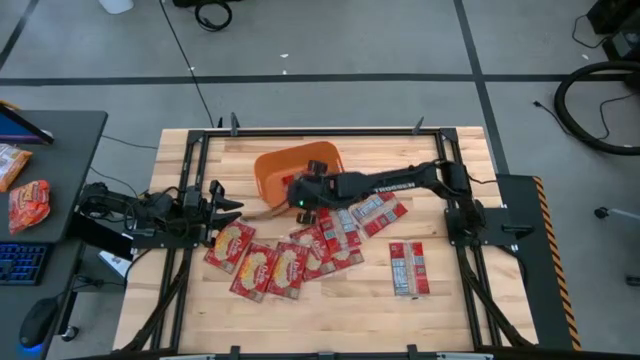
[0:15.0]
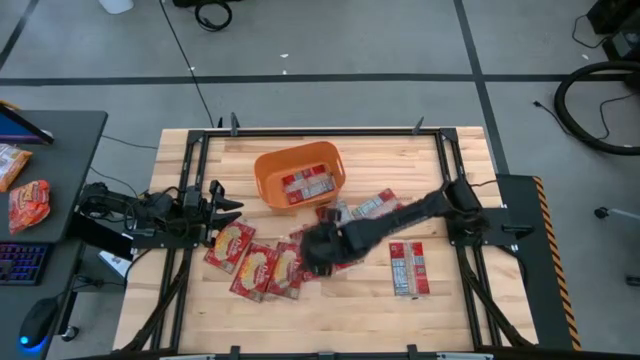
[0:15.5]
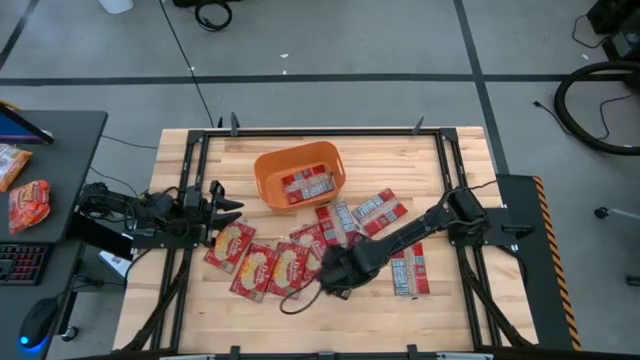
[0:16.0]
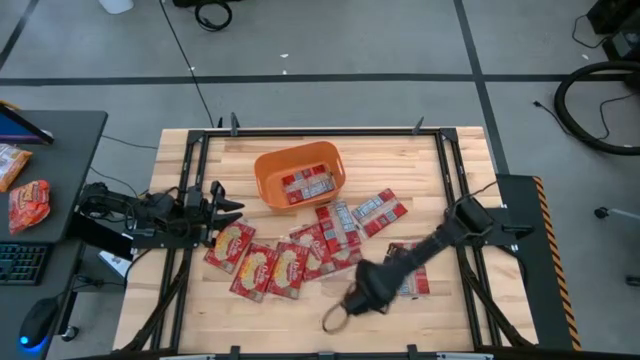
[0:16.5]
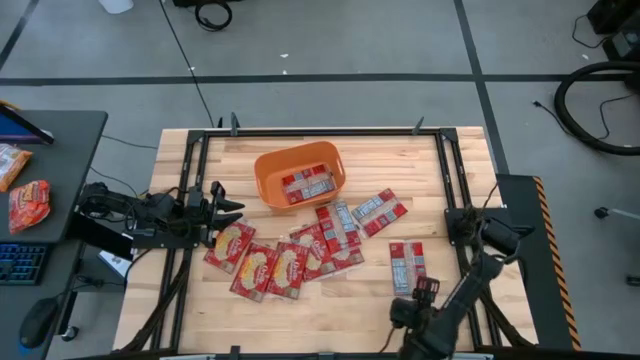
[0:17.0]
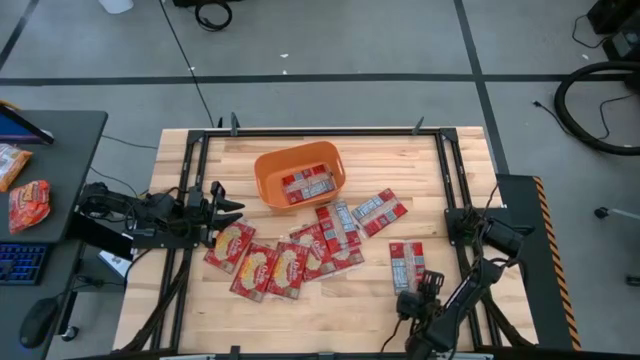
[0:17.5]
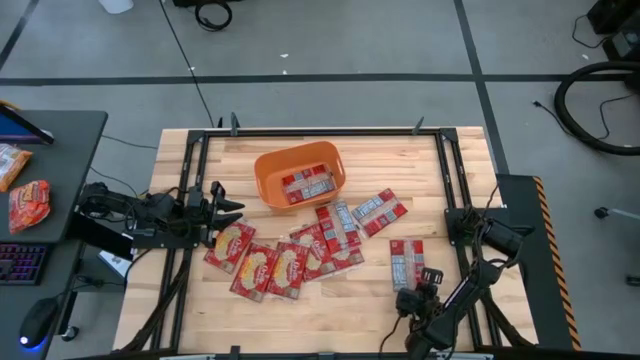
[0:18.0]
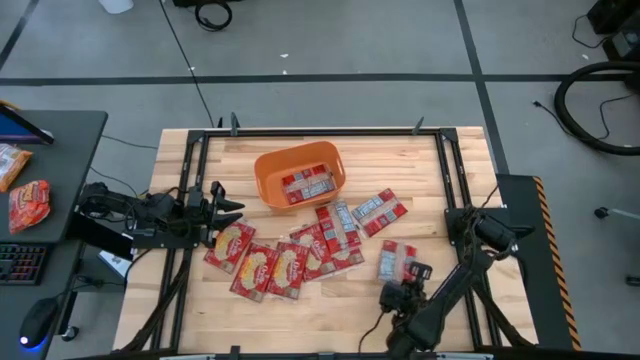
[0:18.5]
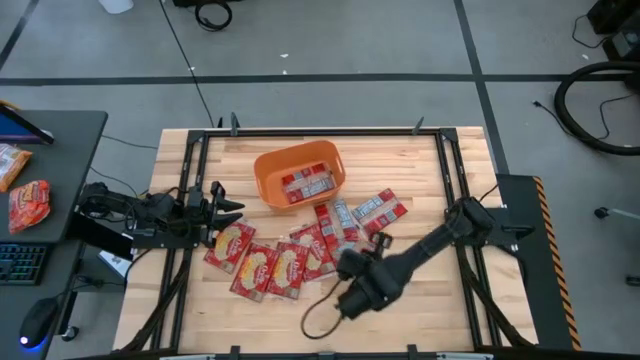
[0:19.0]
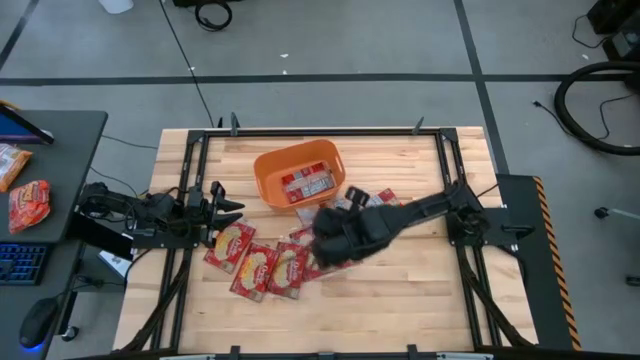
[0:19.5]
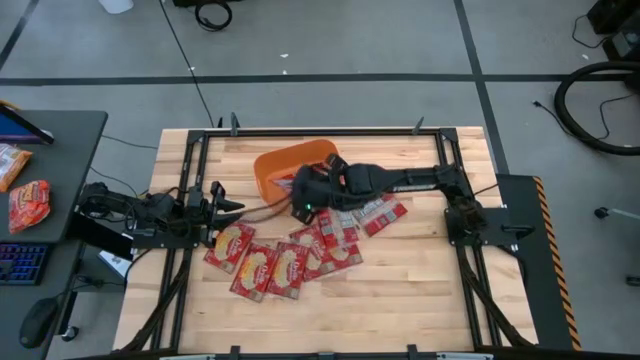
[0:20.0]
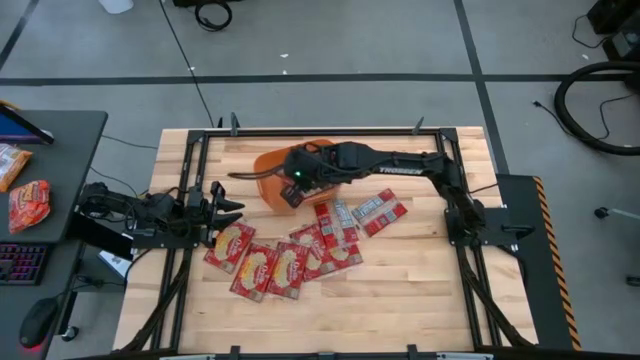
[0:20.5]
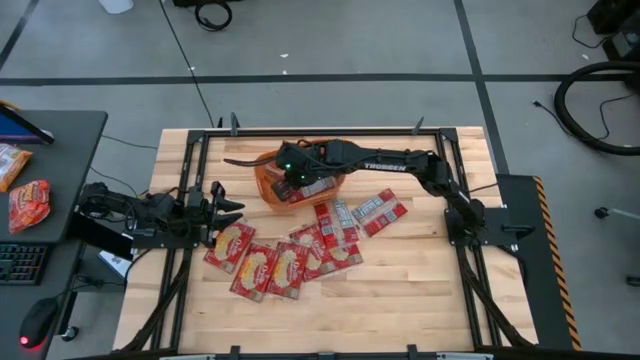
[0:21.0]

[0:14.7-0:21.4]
Task: Sort popcorn bags into baskets
Put the popcorn bag into the orange bin

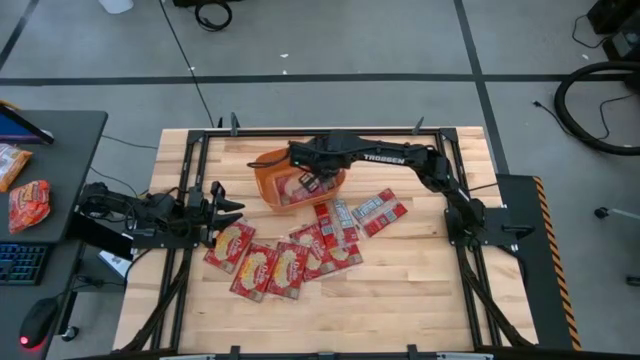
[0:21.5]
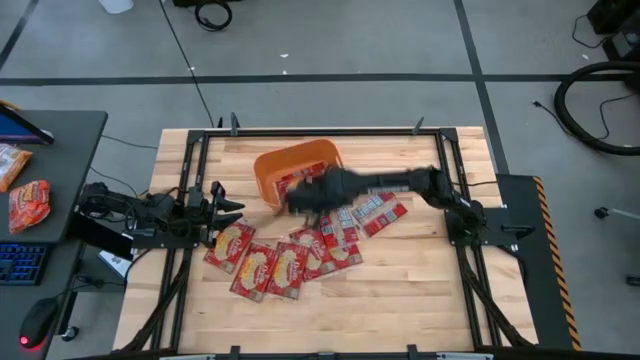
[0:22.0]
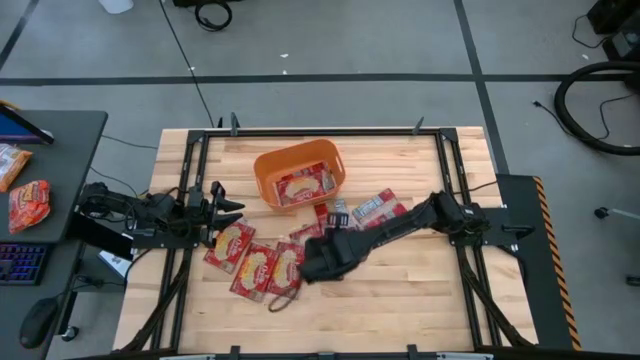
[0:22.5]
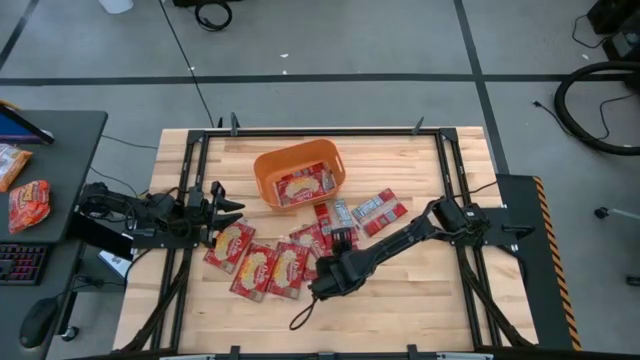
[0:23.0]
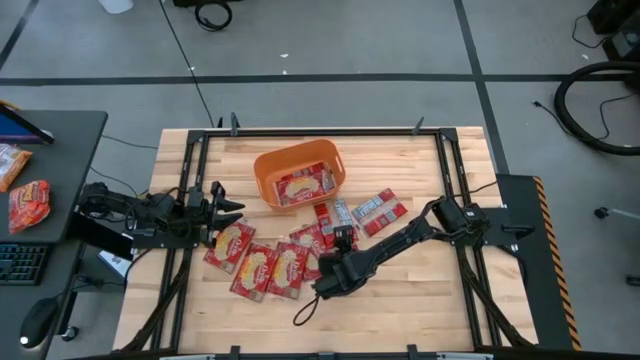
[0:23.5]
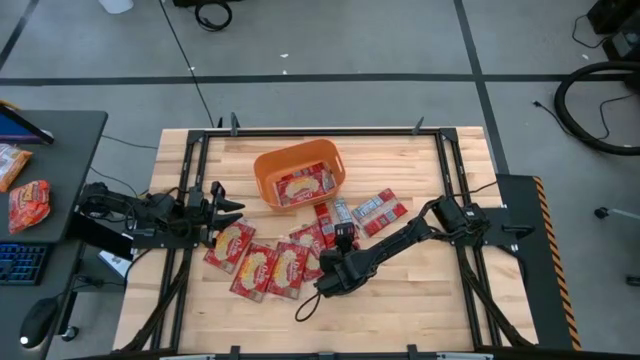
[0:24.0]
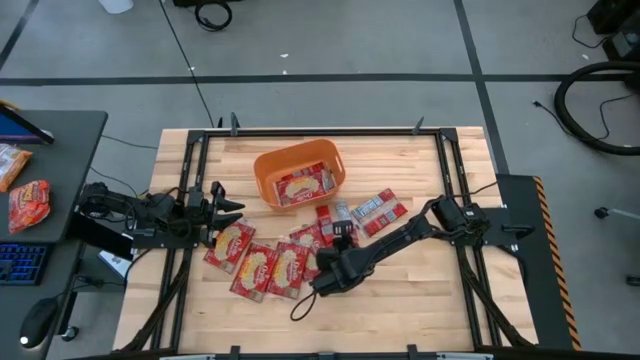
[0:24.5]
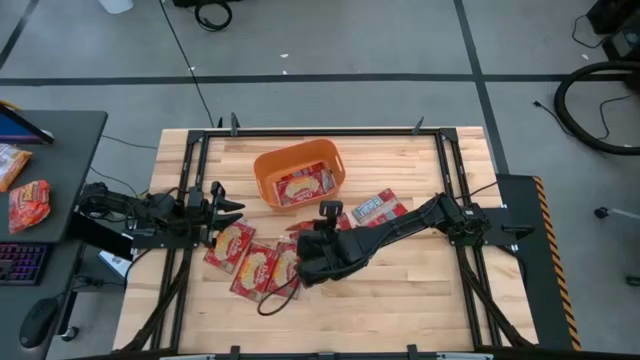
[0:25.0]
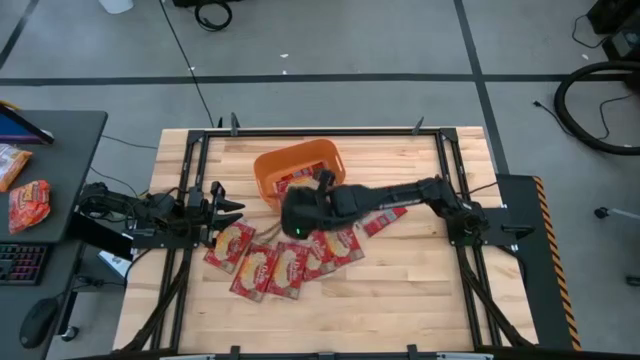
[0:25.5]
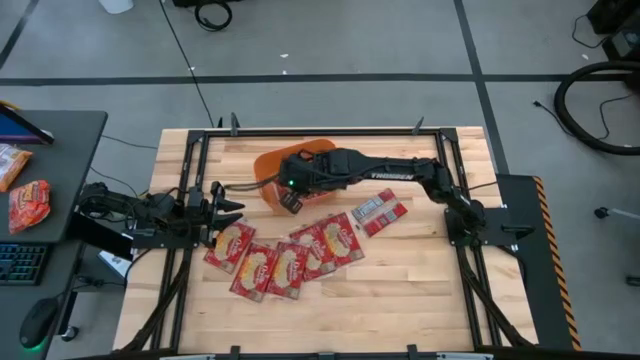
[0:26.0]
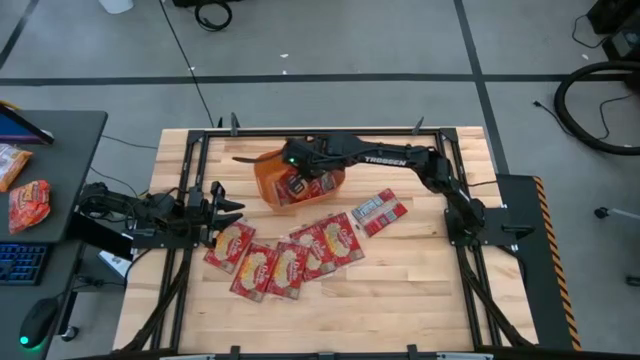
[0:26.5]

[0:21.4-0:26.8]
Put the popcorn bag into the orange bin

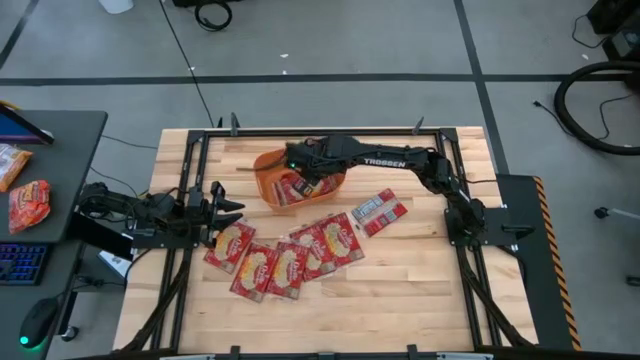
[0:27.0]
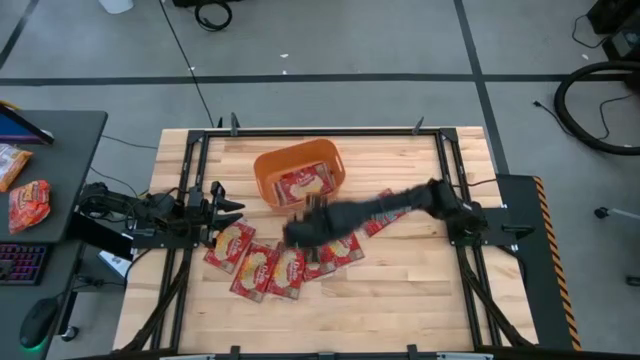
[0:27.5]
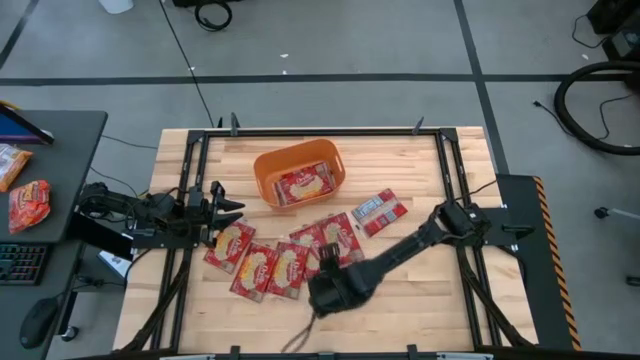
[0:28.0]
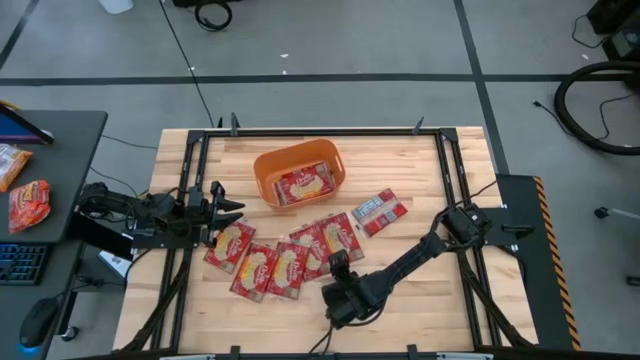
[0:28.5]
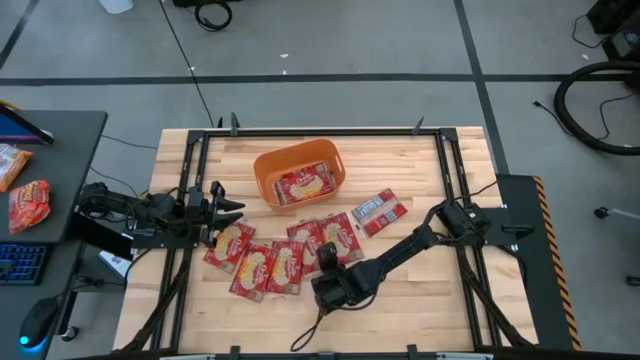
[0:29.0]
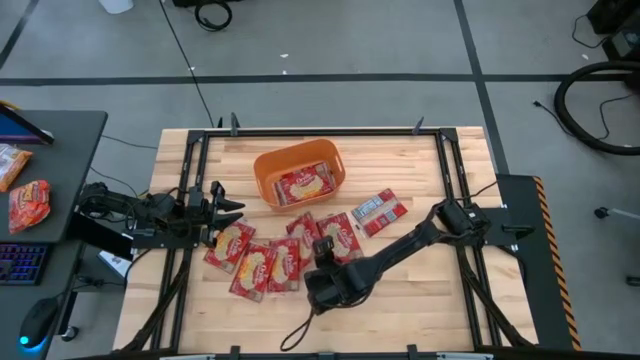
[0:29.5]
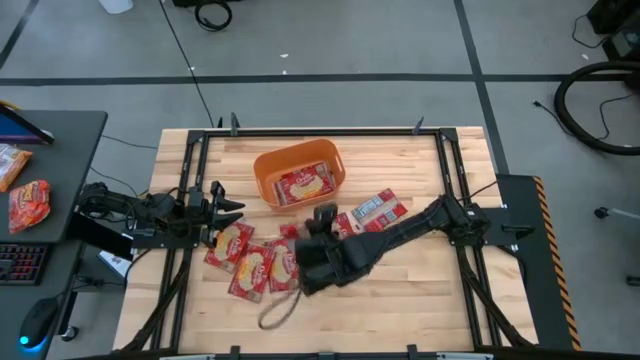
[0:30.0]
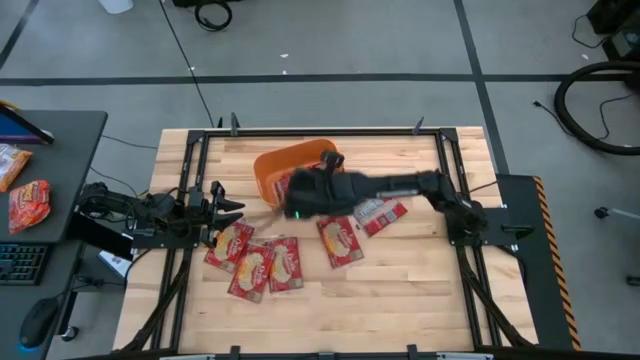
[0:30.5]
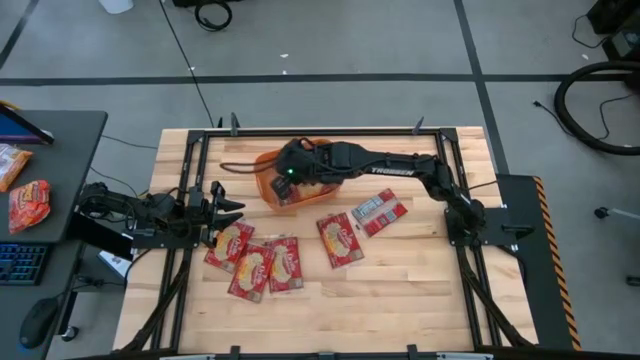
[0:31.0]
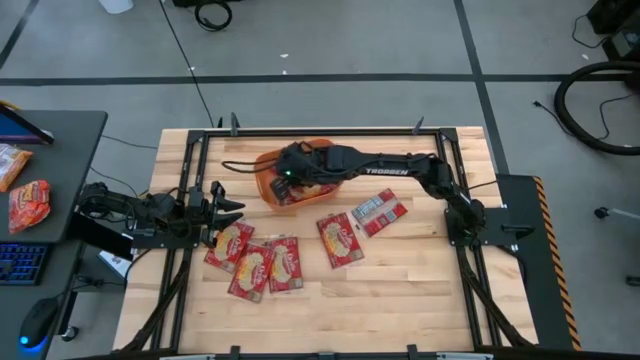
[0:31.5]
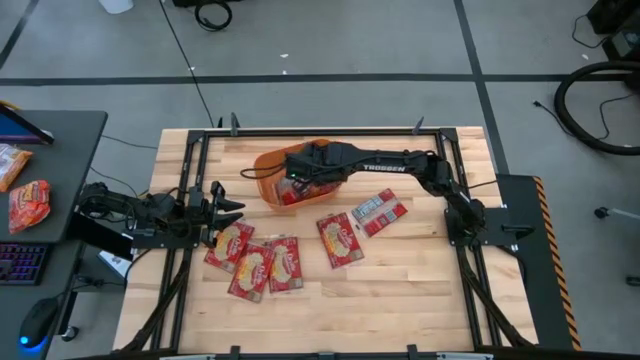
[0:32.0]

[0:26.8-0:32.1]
Put the popcorn bag into the orange bin

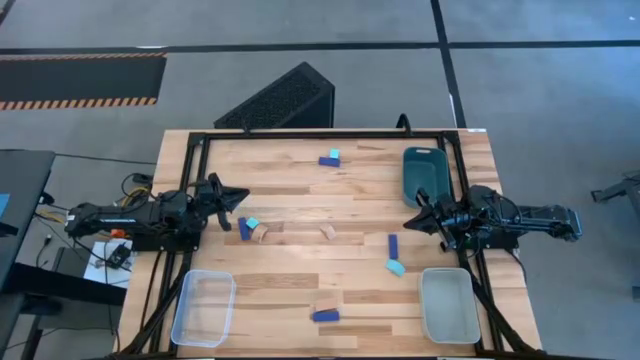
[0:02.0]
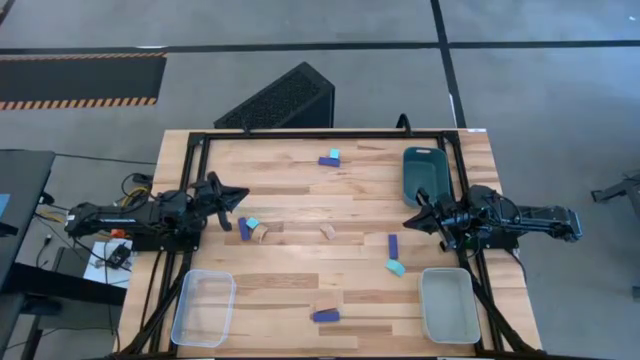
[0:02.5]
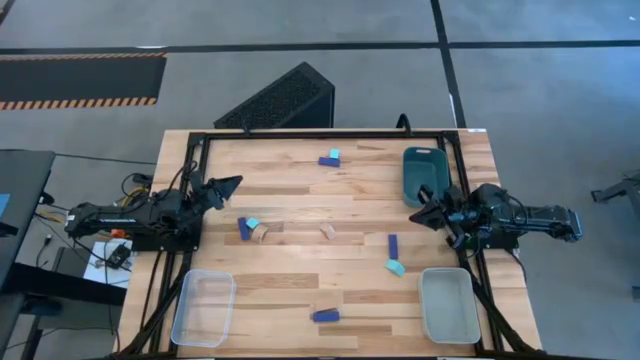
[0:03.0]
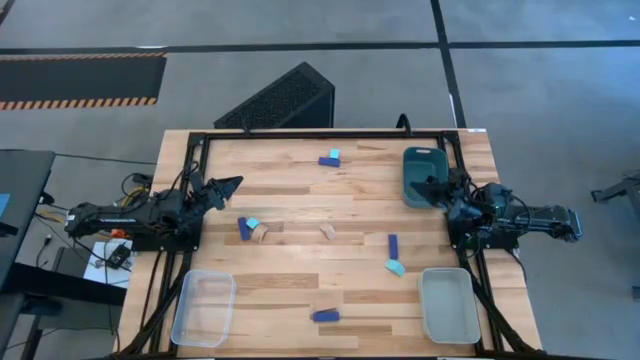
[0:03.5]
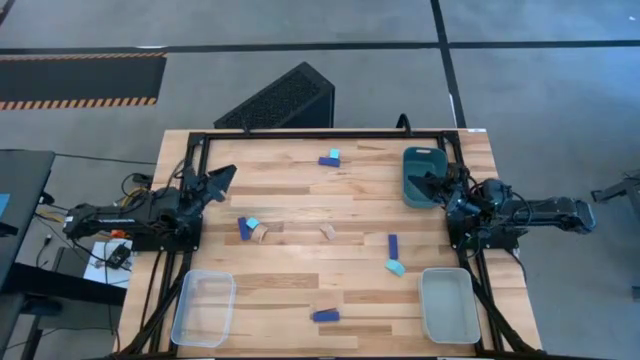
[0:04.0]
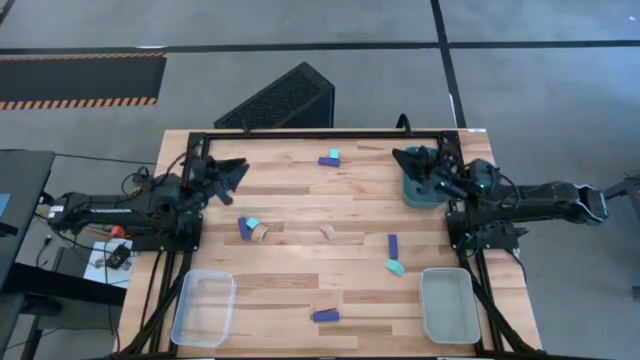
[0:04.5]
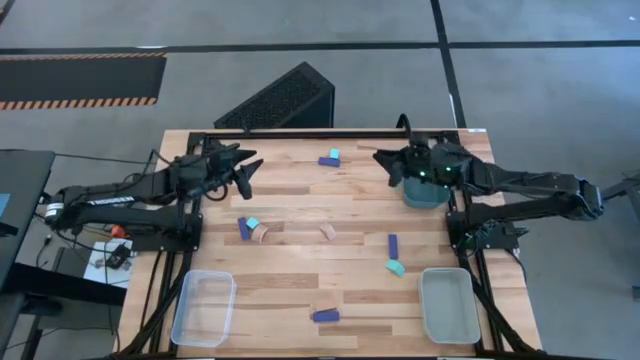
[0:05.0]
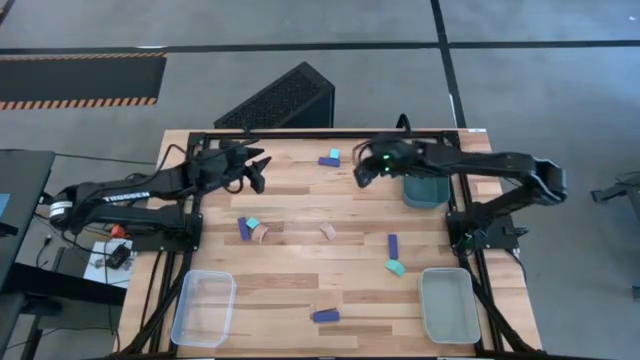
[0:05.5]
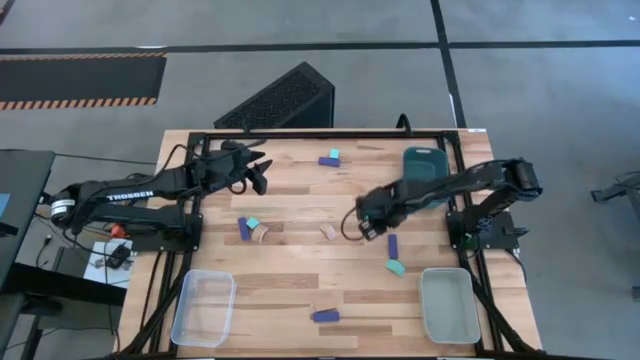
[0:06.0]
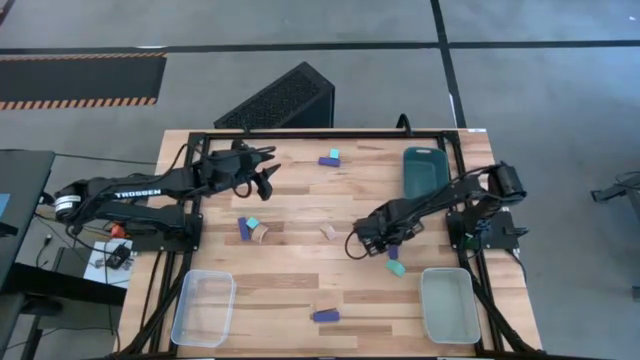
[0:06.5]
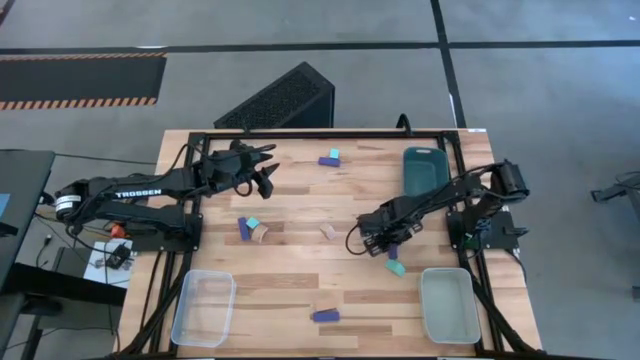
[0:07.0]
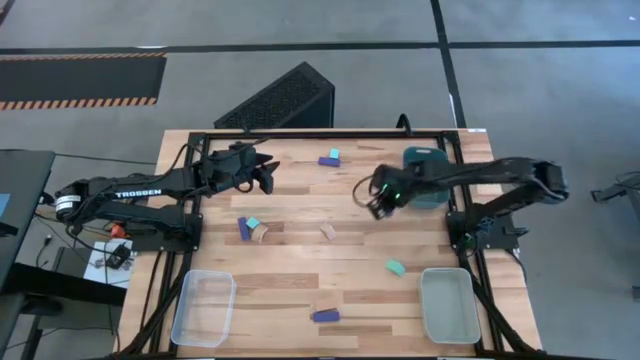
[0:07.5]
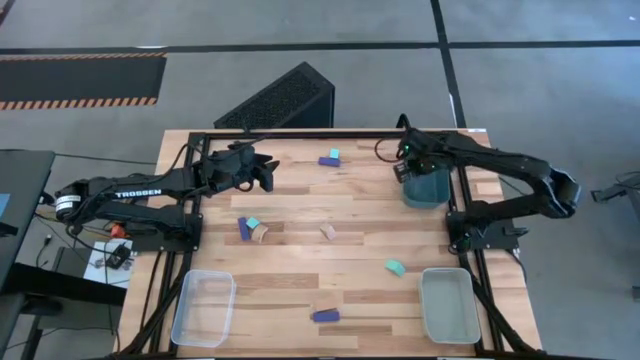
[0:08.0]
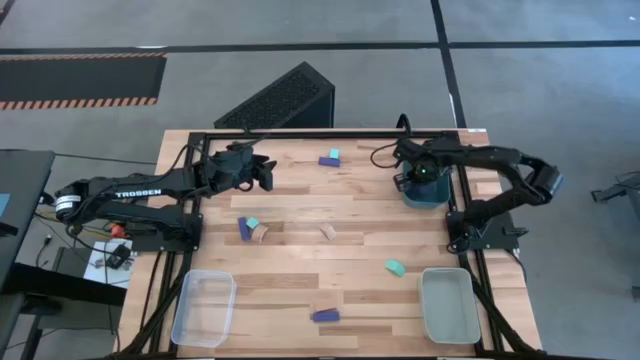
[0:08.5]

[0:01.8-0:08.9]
Task: Sort & place blocks by color
Put the blue block into the green bin
